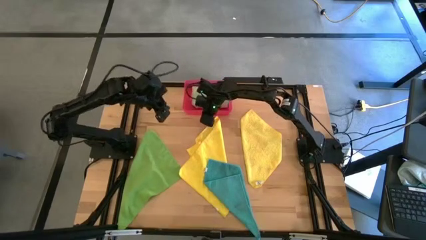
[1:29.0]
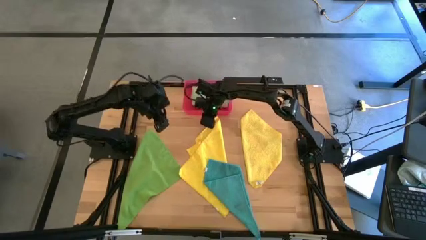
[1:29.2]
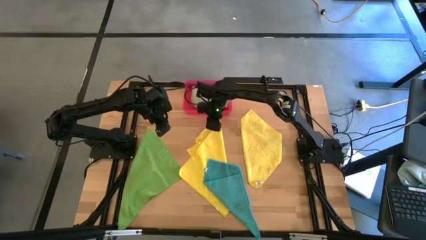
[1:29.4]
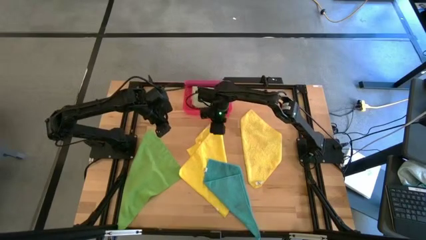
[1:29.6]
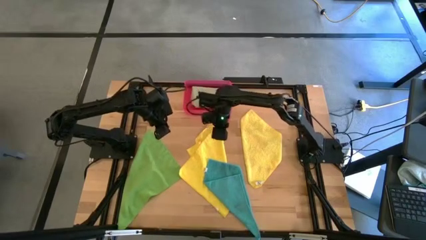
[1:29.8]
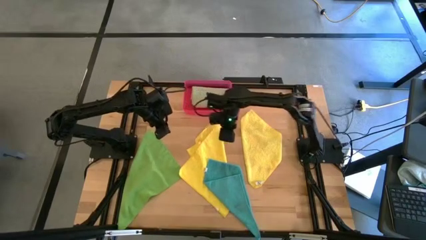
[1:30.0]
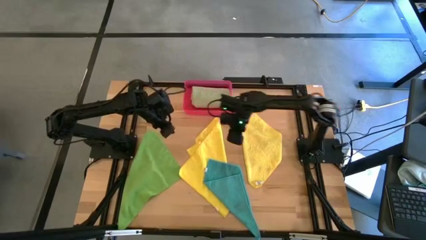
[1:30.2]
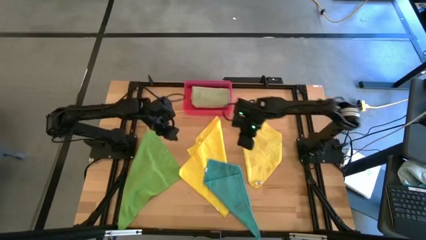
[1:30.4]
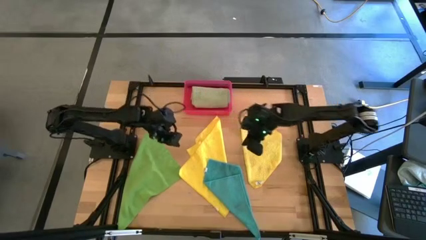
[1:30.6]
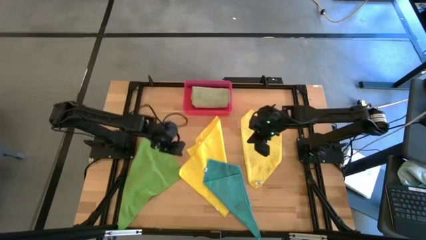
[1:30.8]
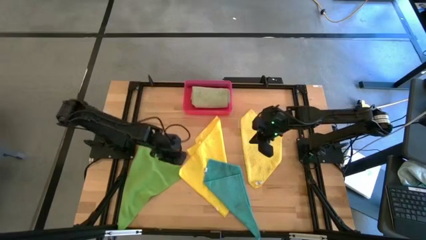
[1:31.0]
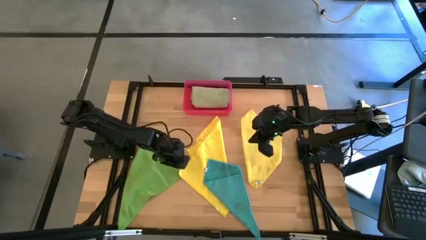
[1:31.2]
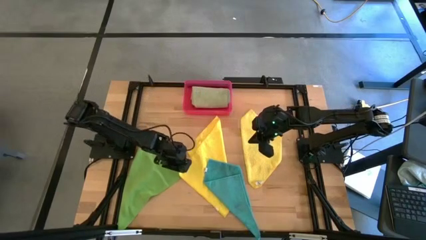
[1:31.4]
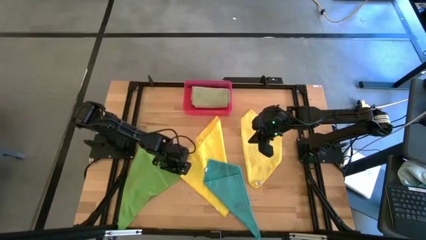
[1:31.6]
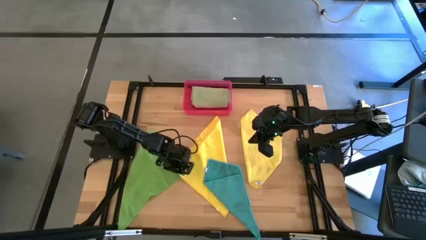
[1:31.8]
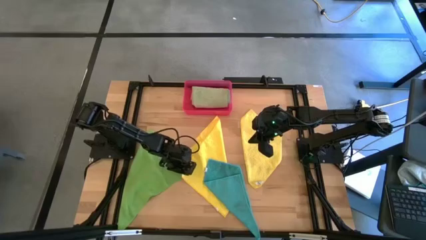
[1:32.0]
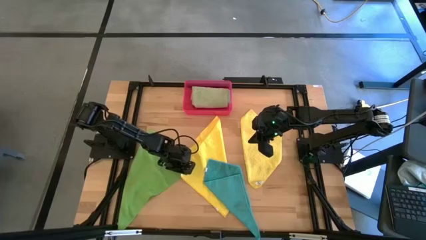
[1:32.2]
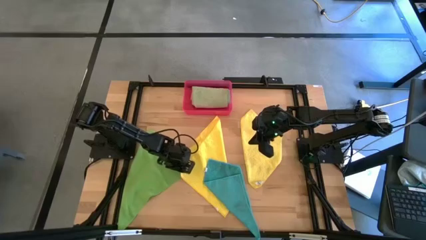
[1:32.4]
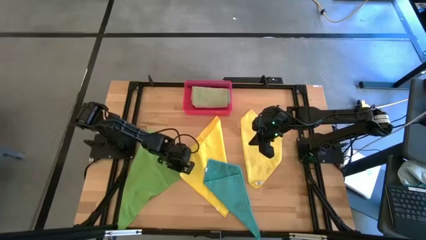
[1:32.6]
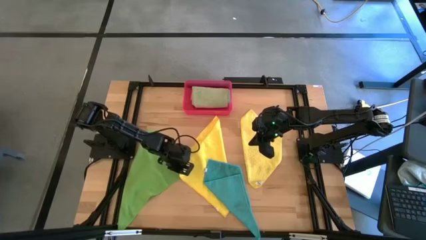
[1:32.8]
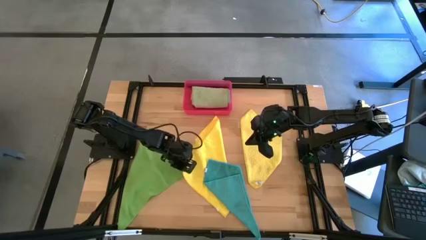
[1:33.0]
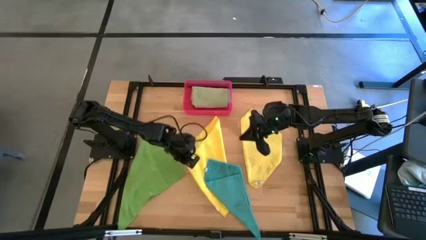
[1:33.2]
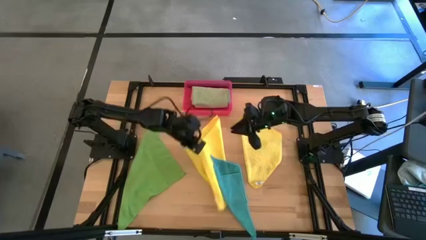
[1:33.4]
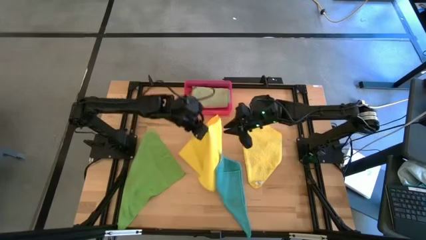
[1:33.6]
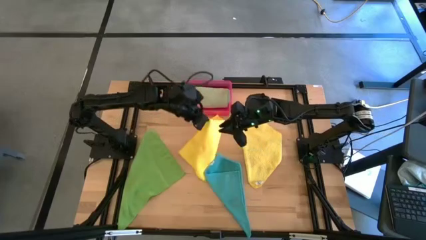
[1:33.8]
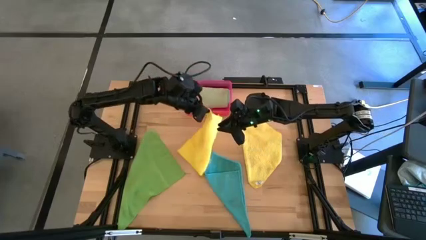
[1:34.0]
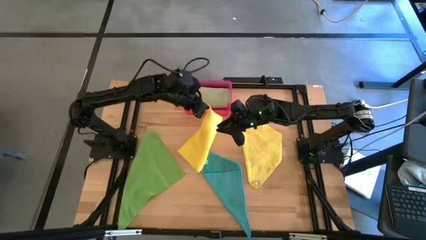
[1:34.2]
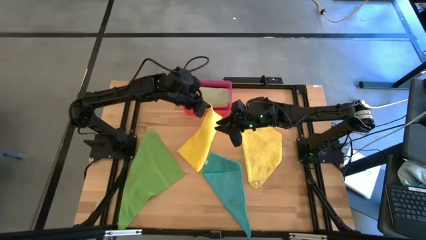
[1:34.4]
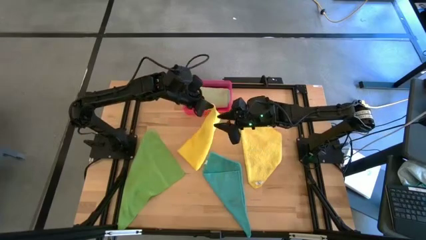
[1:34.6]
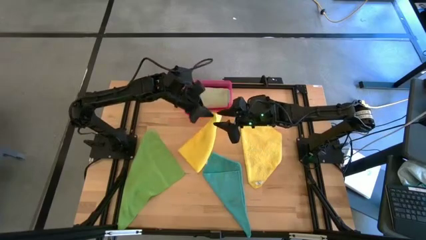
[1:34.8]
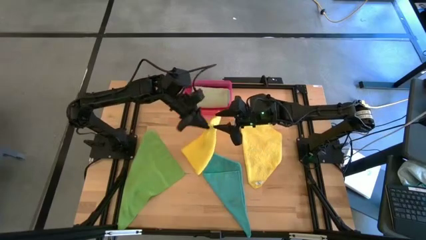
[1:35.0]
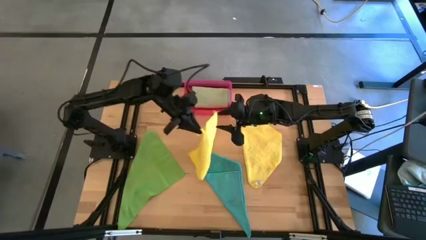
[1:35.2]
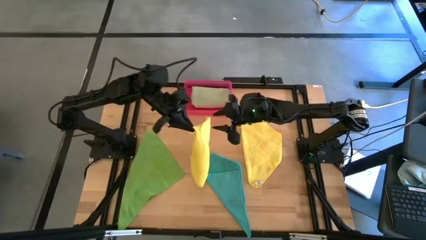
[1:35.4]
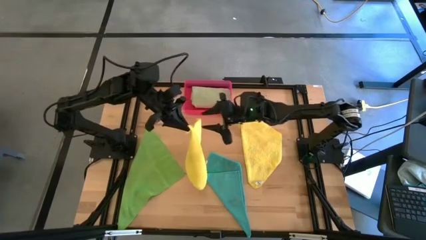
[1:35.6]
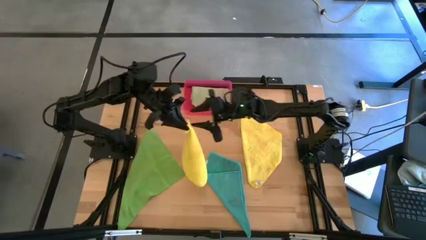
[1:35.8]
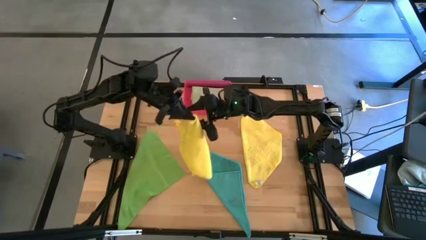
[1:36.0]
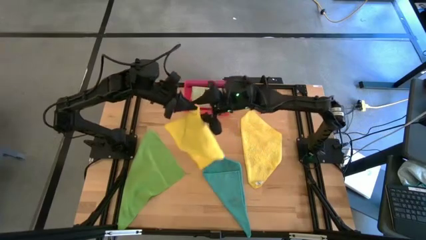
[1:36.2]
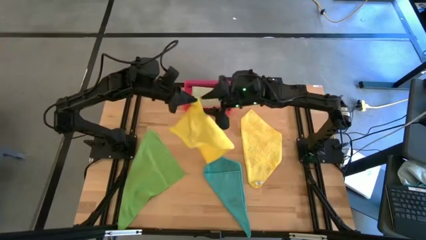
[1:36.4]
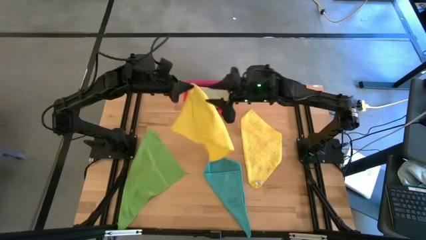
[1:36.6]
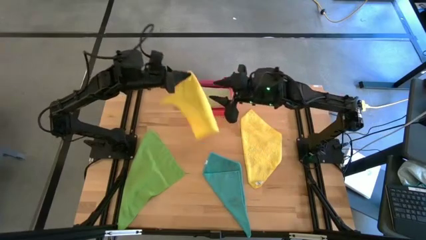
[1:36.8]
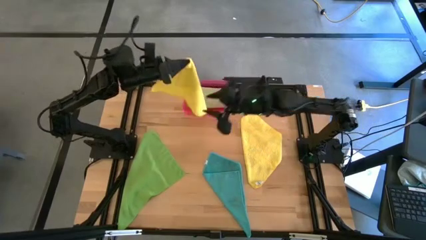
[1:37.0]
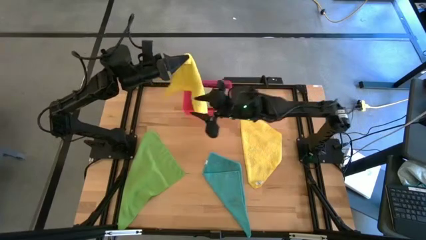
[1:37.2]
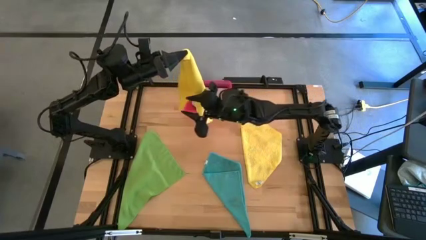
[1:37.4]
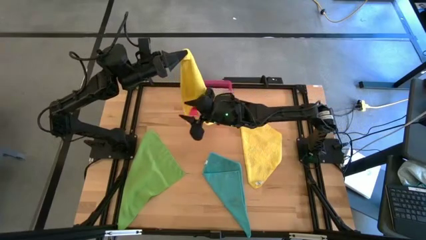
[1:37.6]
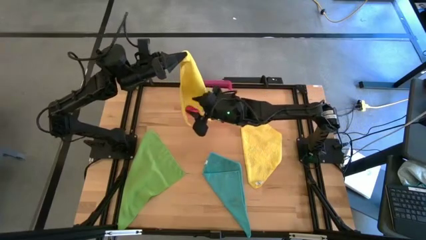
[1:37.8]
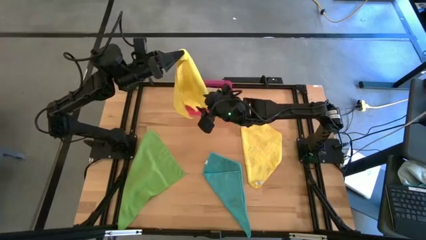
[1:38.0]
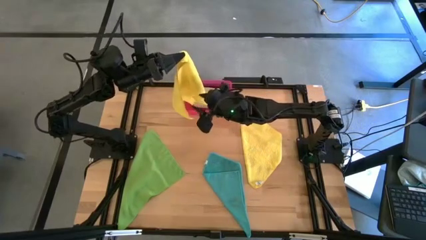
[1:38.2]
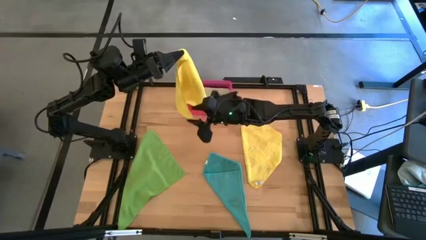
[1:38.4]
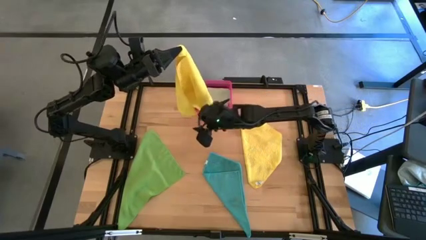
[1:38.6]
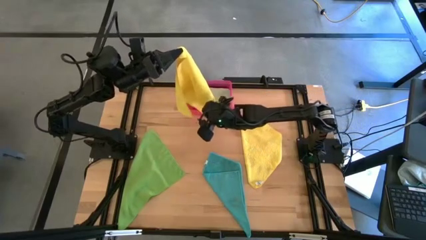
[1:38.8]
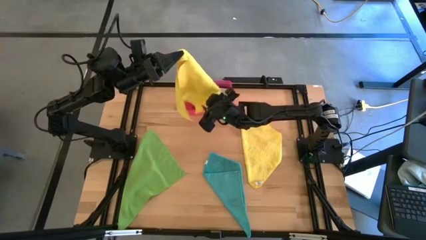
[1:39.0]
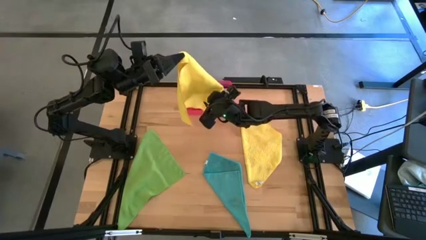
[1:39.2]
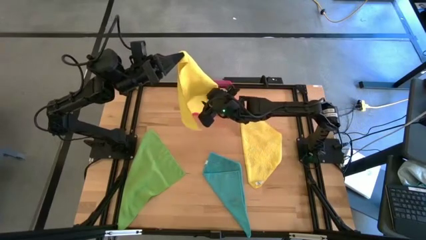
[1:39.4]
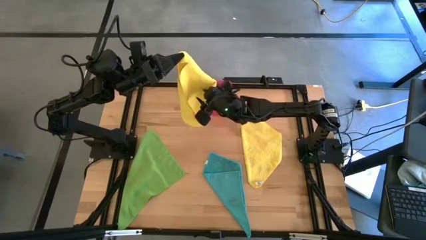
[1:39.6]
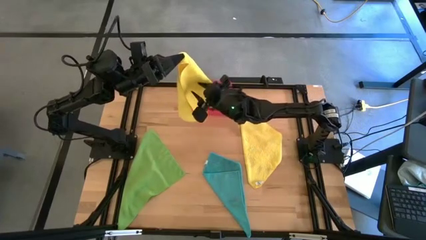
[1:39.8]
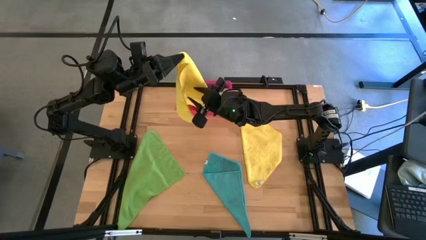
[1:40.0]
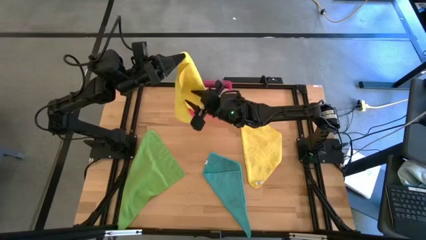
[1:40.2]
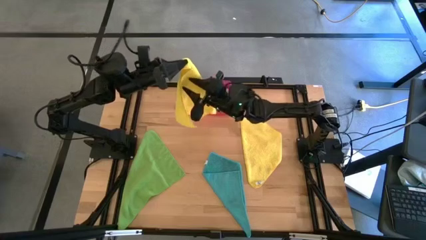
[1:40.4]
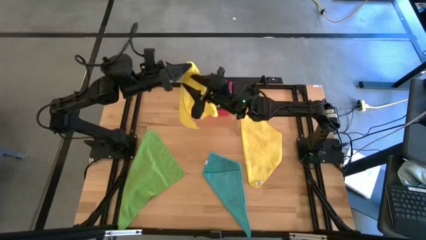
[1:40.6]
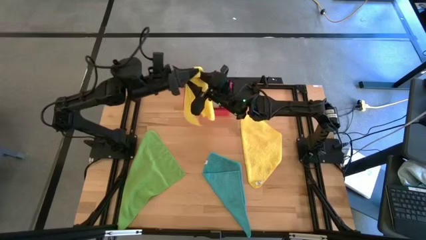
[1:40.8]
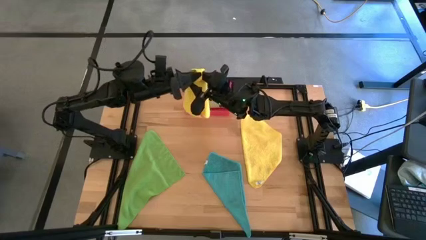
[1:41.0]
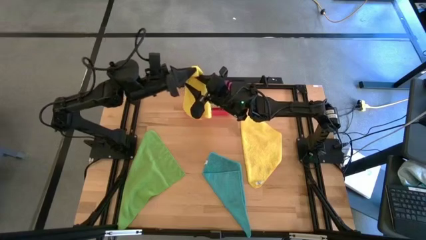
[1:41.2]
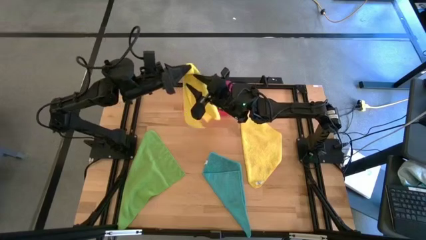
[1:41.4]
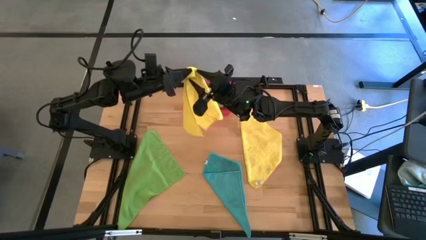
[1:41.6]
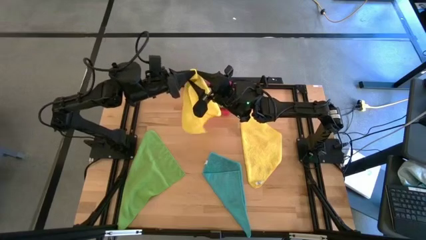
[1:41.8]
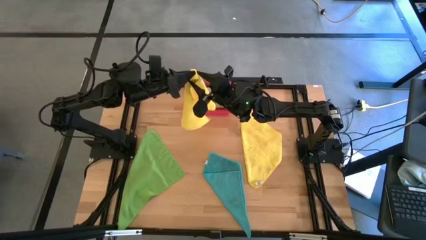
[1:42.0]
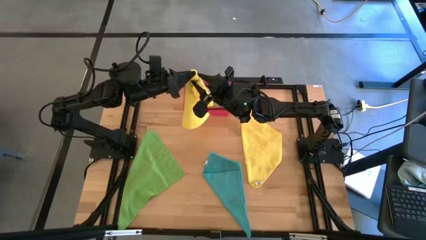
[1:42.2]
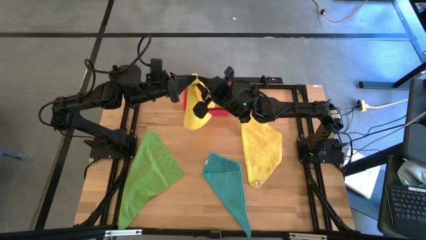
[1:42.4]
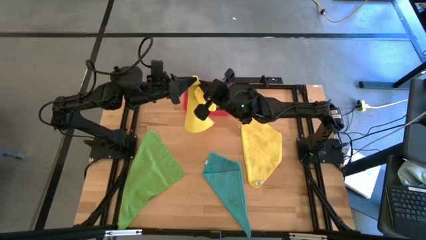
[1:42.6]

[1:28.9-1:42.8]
Task: Fold microfiber towels
Fold the left yellow microfiber cloth

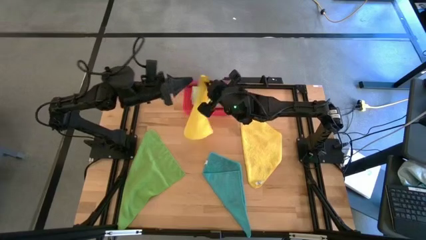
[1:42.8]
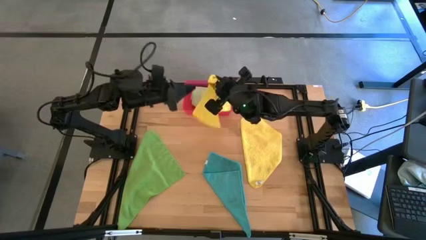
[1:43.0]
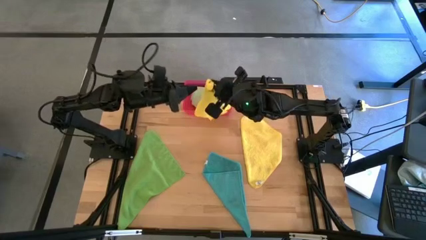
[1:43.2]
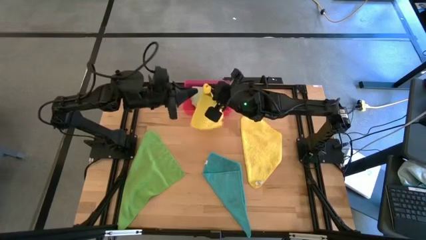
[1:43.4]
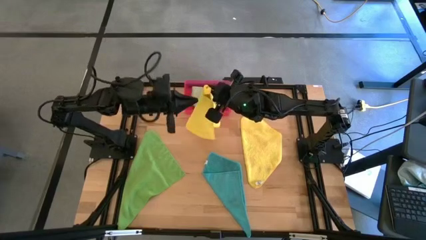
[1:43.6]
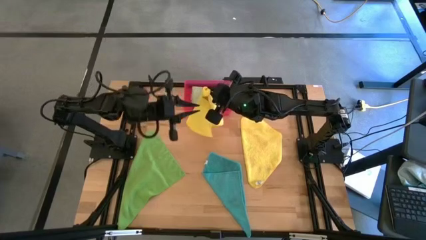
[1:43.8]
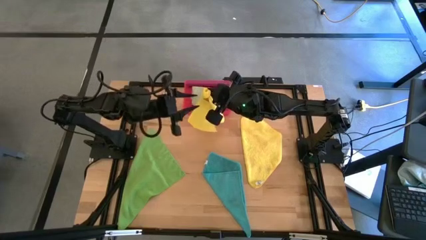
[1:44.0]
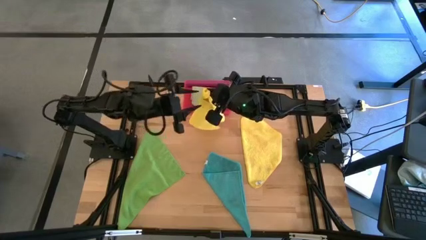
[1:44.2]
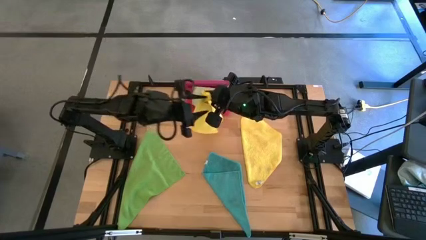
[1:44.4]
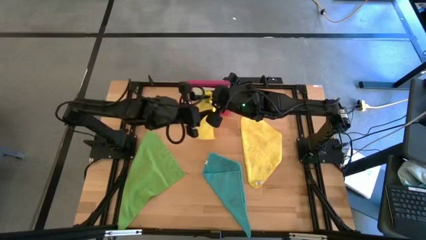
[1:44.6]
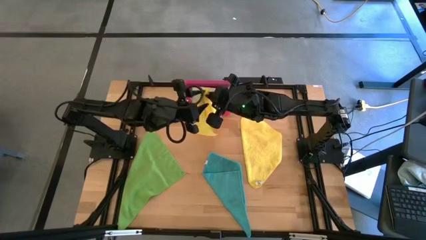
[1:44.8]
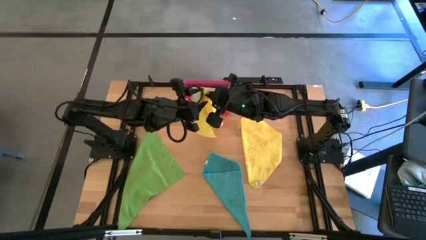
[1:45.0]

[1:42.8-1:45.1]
Fold the left yellow microfiber cloth
